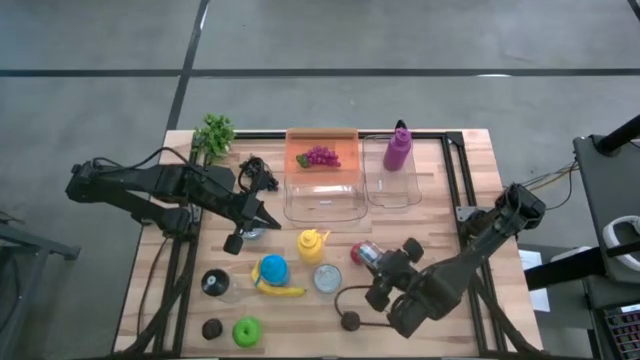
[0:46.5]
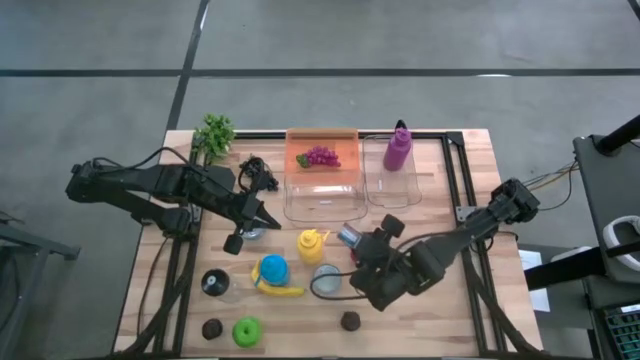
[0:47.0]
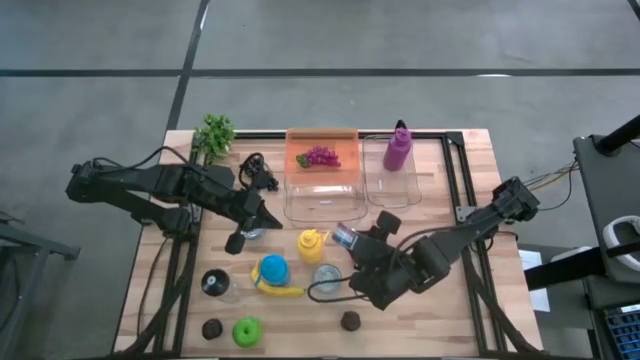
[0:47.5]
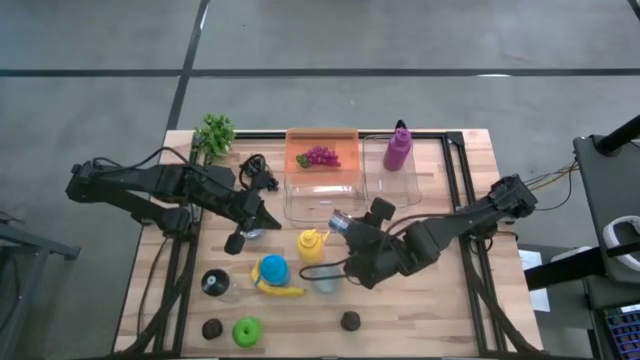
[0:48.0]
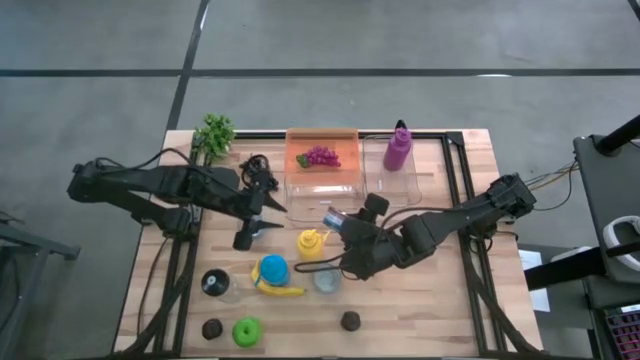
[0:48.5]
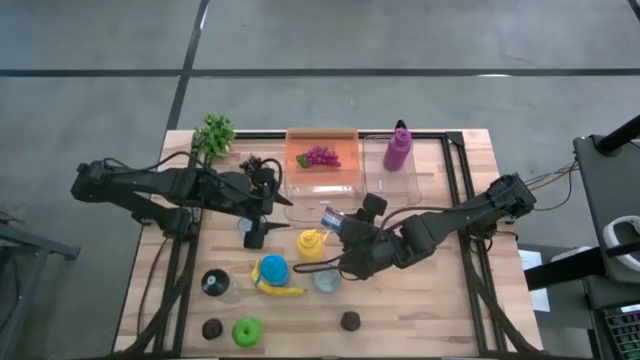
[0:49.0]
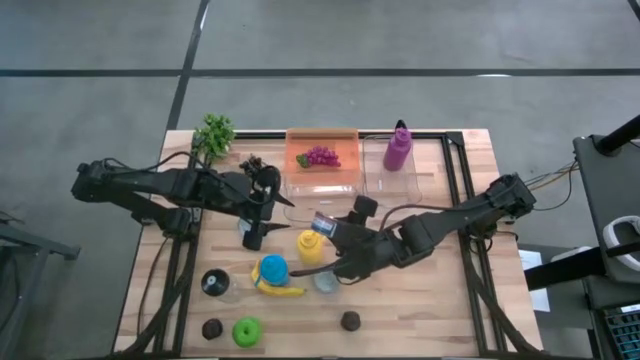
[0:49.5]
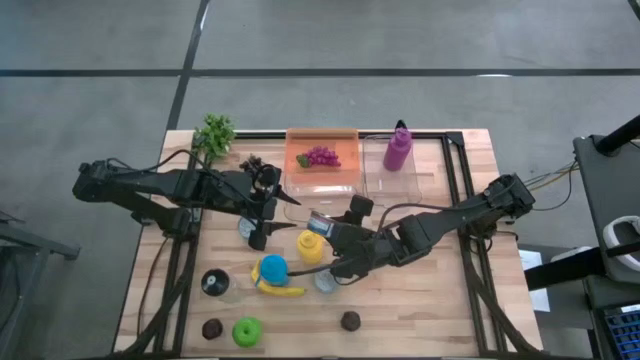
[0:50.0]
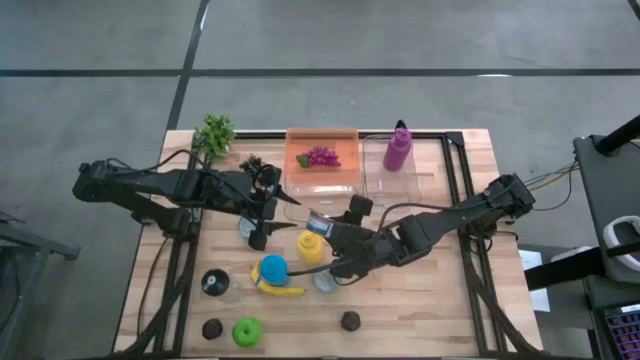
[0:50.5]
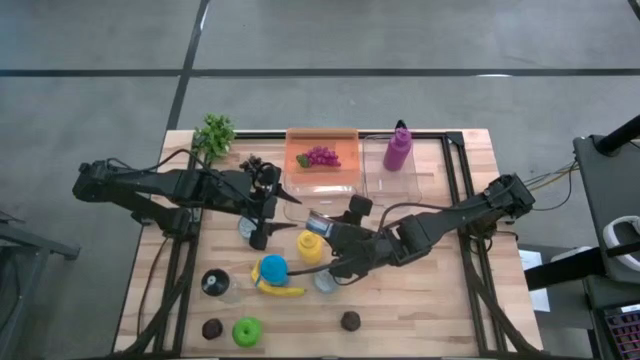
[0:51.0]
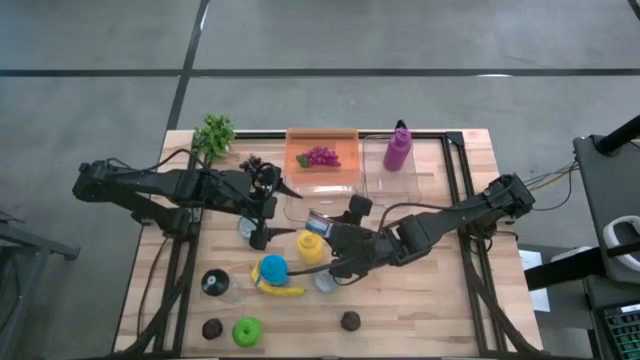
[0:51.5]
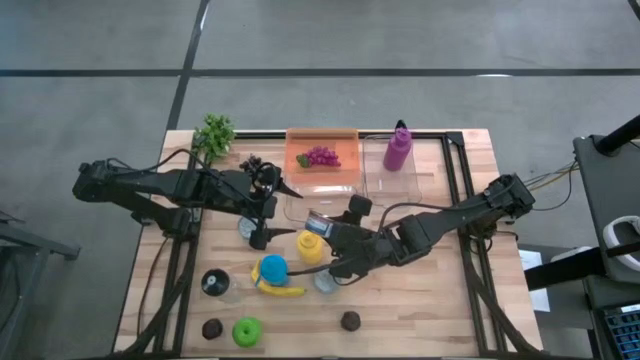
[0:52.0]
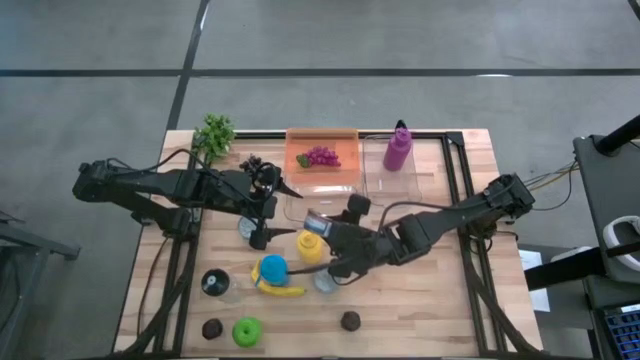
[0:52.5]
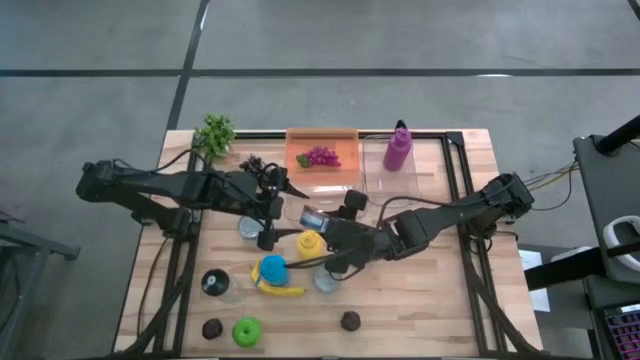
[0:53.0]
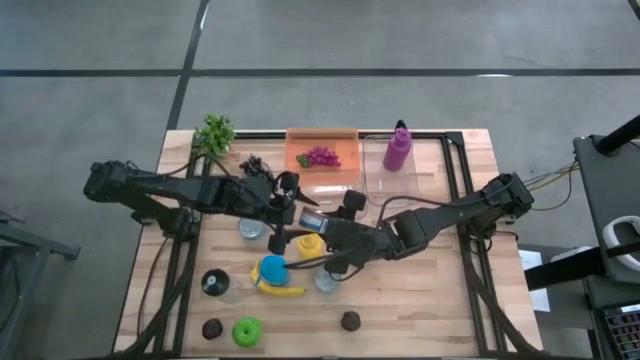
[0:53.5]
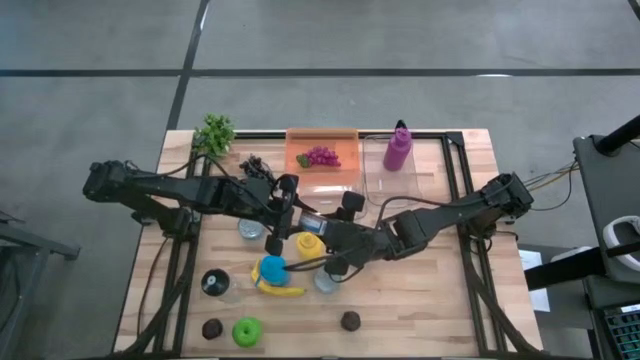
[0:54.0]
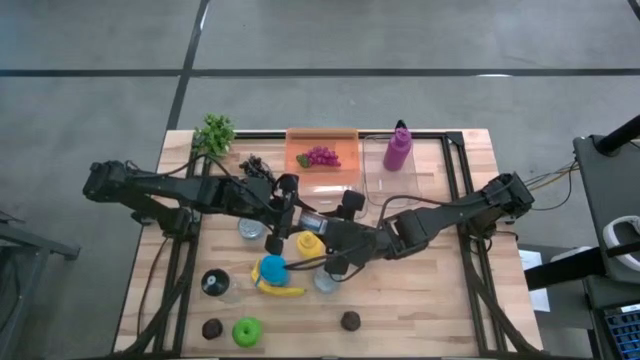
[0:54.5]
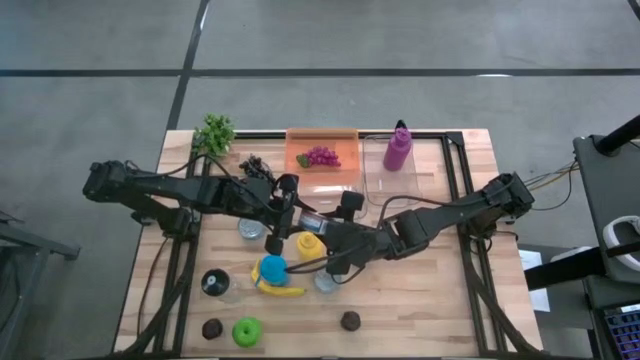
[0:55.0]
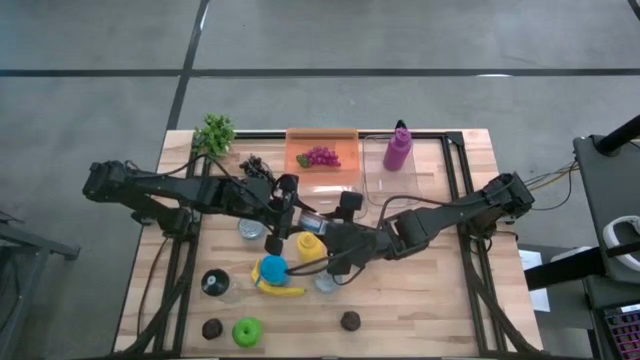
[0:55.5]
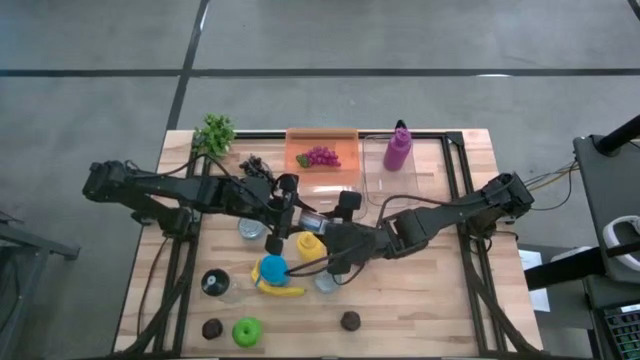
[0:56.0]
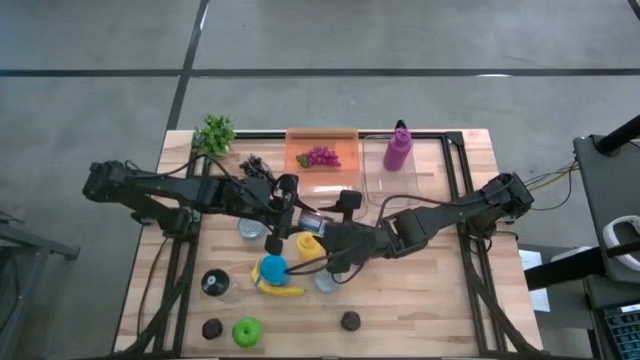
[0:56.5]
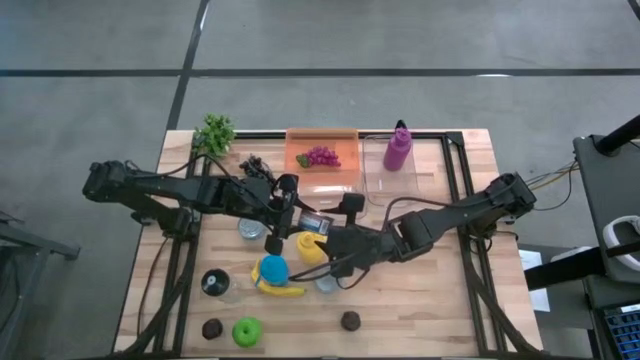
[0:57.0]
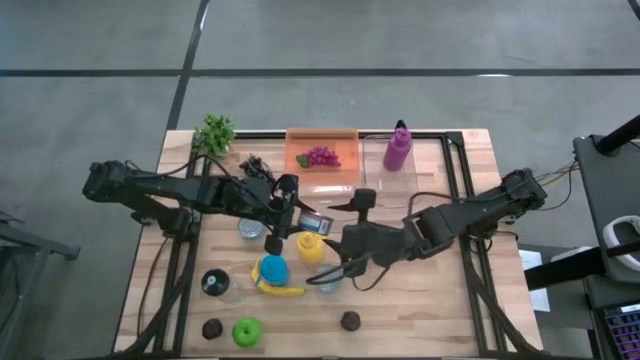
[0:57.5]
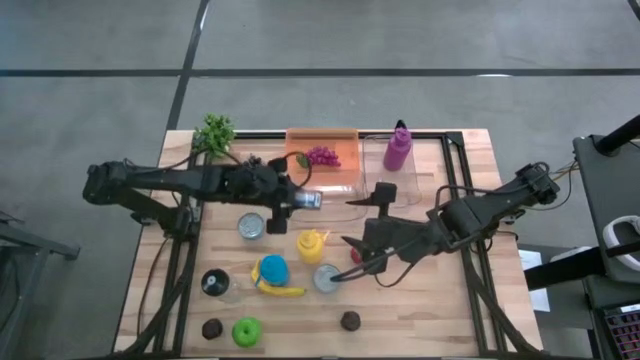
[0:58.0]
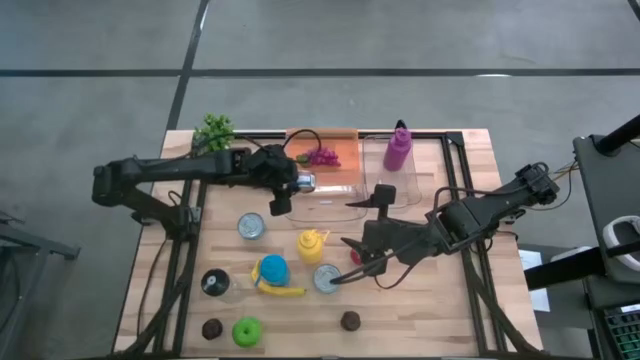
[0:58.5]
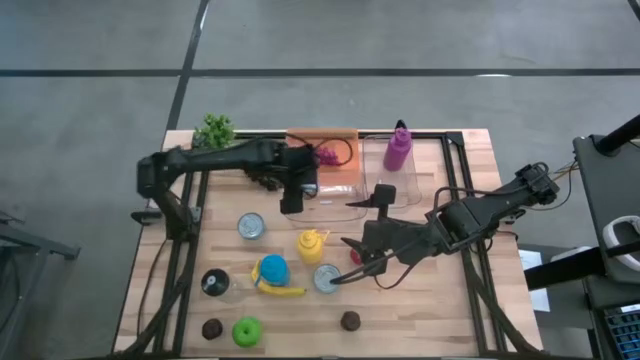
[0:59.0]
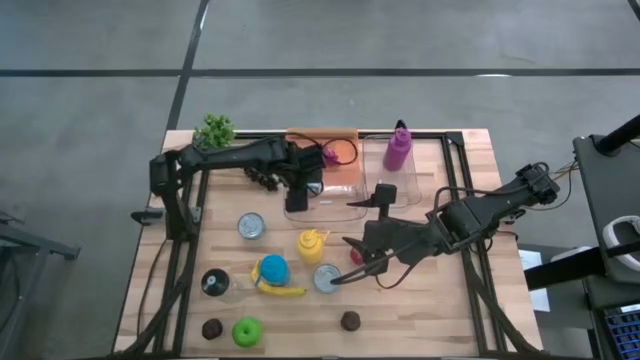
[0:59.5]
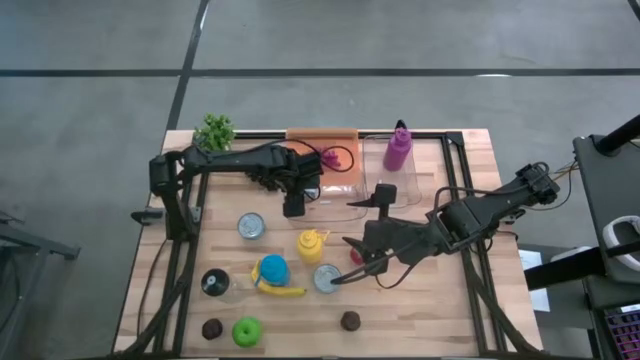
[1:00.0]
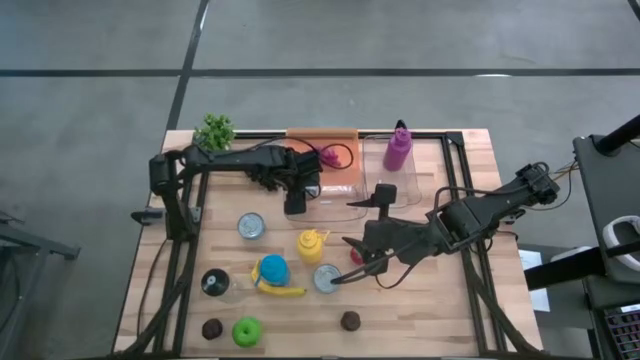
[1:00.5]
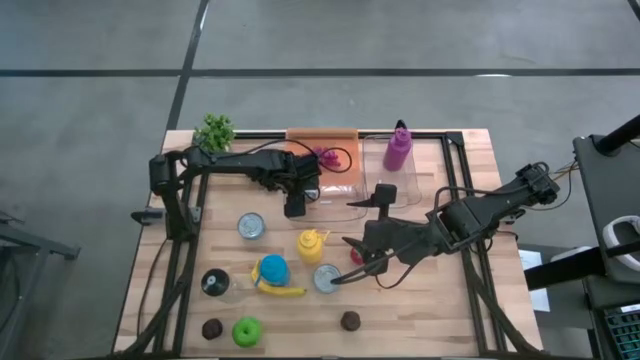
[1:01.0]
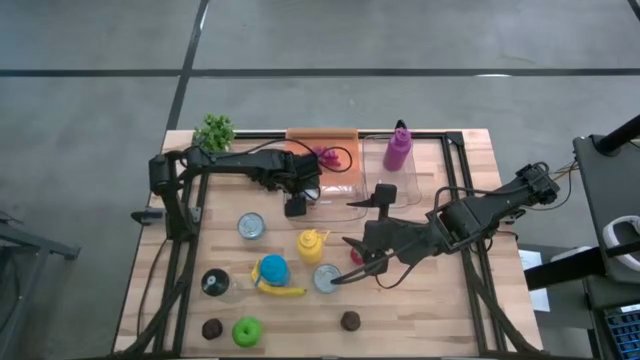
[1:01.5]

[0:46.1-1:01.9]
Task: Pick & Place Food Item
Put the blue and pink can into the left transparent bin

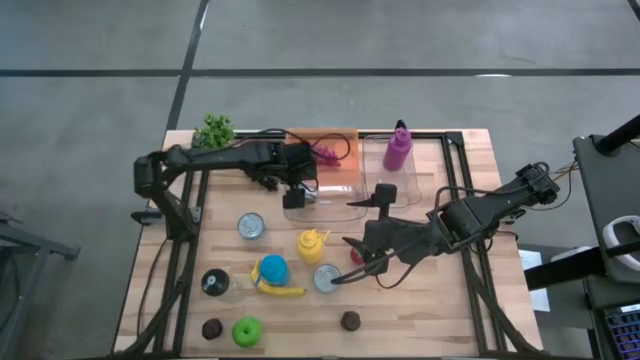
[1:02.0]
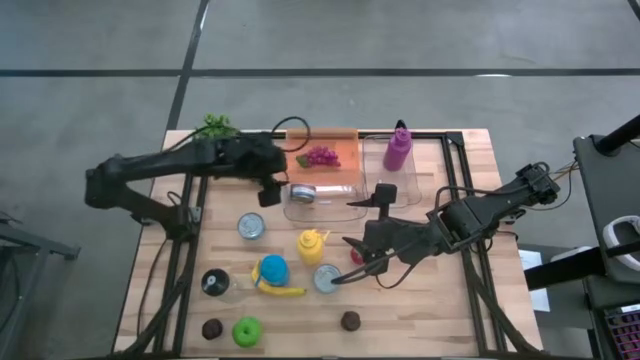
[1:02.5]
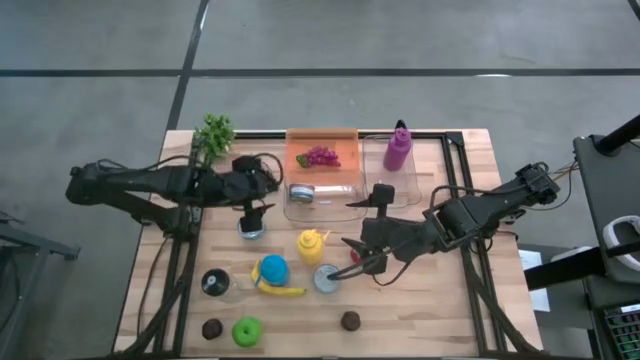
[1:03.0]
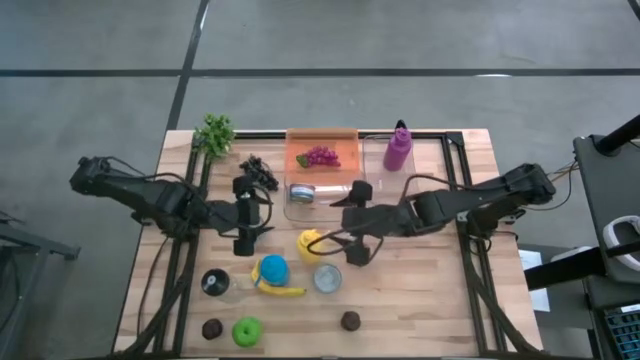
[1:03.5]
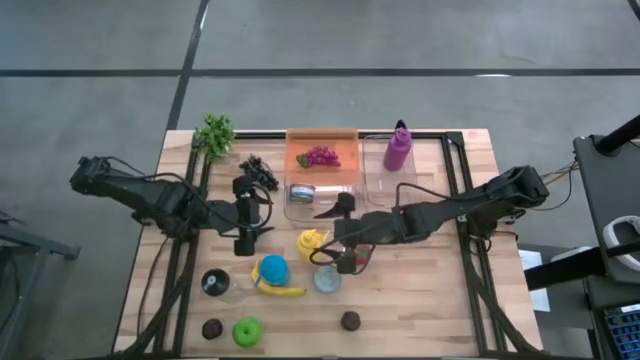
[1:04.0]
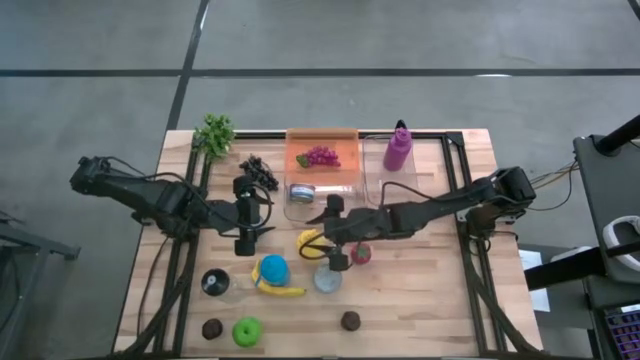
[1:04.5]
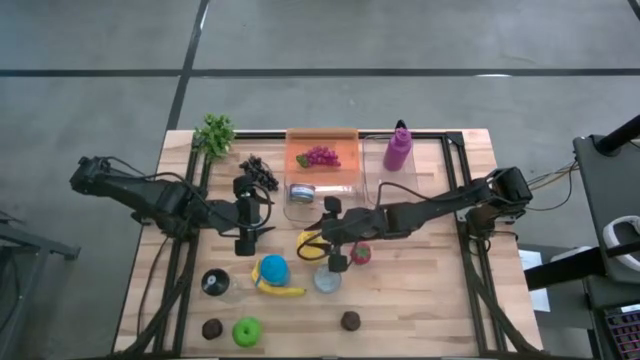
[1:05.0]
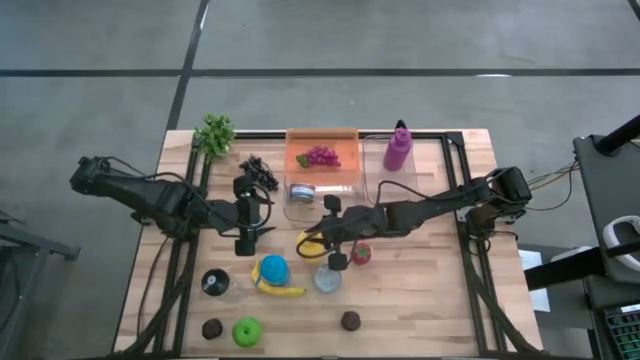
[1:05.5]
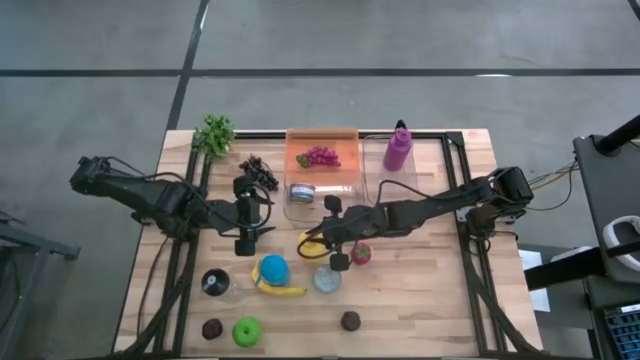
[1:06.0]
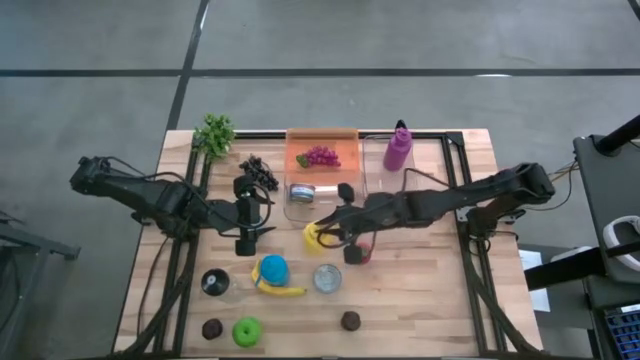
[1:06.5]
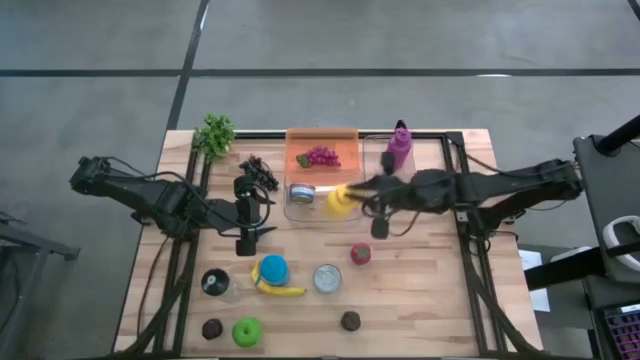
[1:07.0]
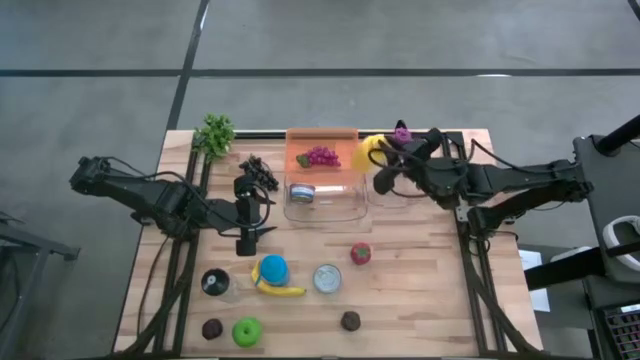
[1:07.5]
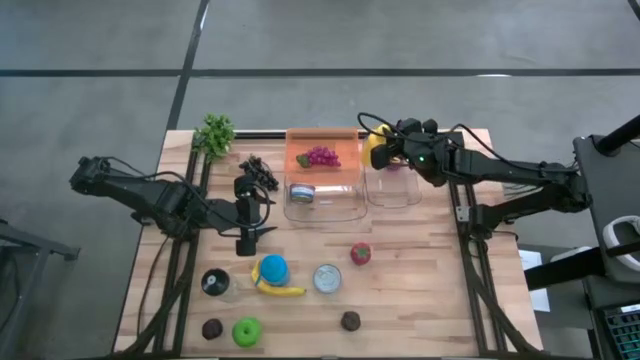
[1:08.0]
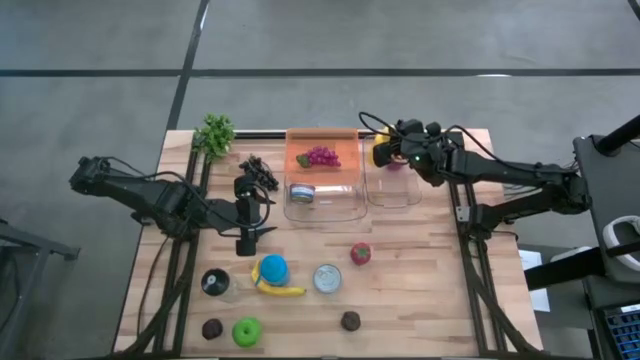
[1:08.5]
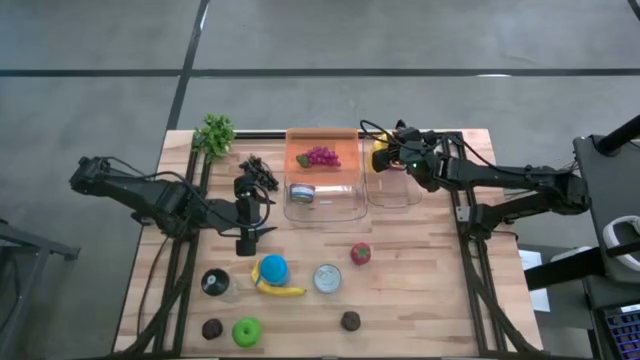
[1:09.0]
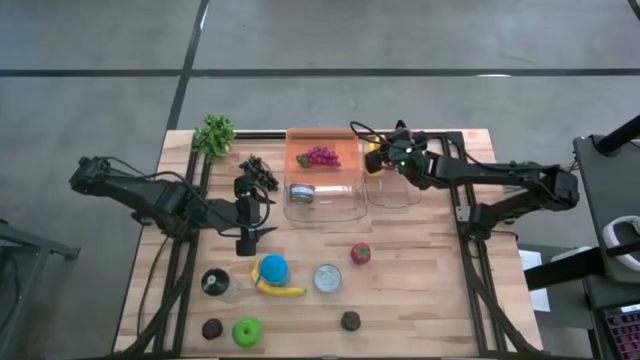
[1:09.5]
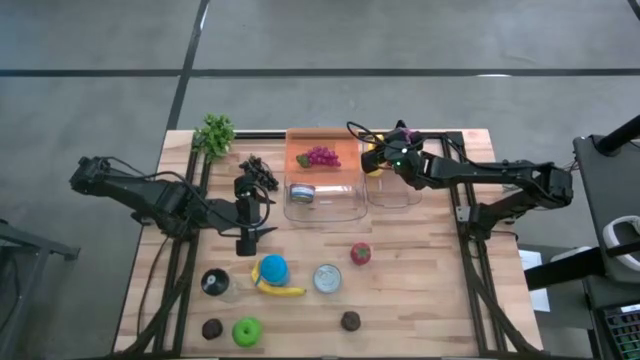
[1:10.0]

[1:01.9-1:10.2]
Put the yellow water bottle into the right transparent bin
